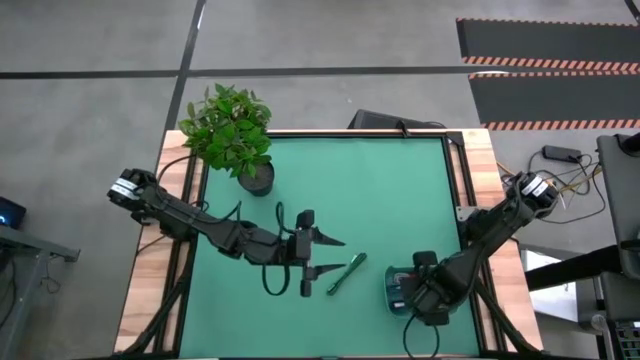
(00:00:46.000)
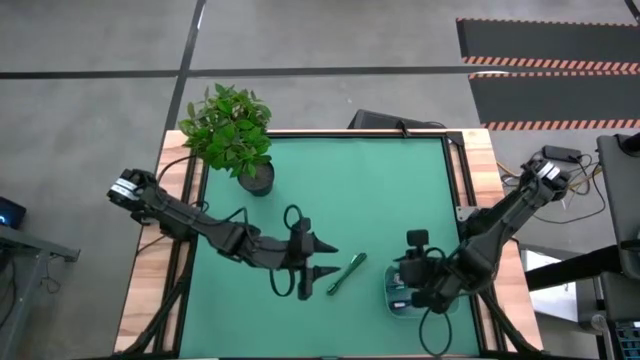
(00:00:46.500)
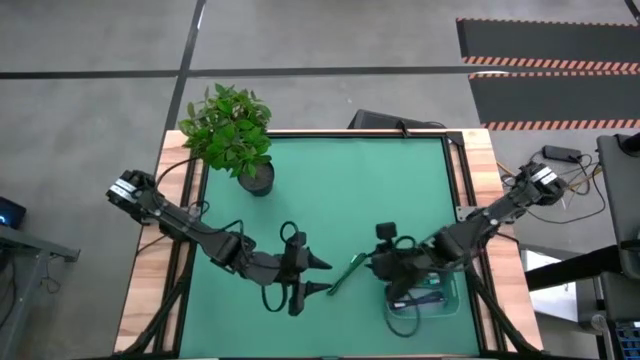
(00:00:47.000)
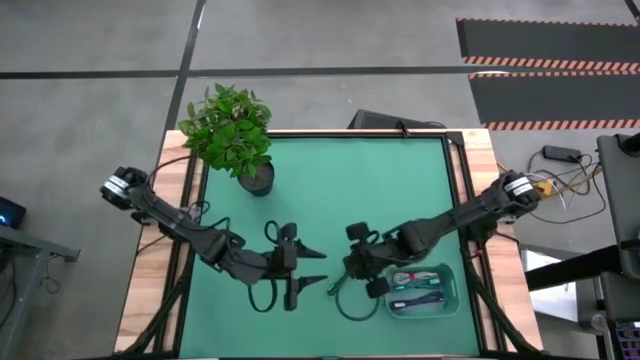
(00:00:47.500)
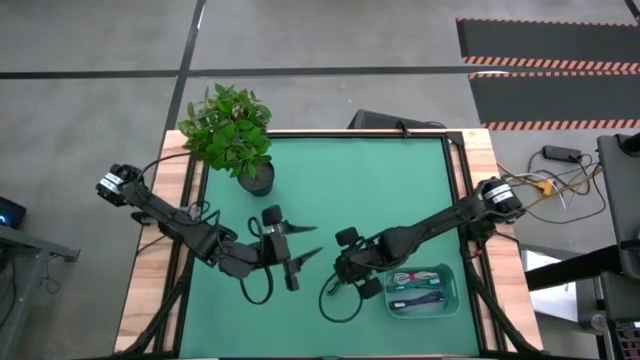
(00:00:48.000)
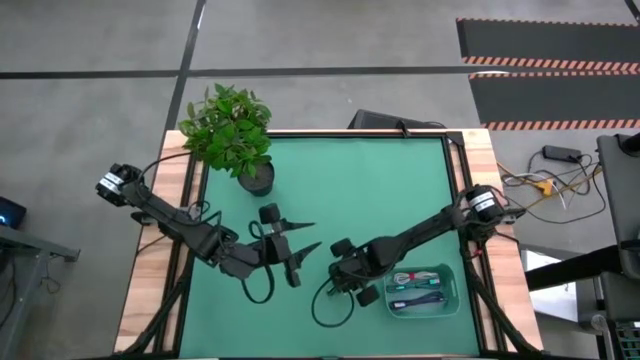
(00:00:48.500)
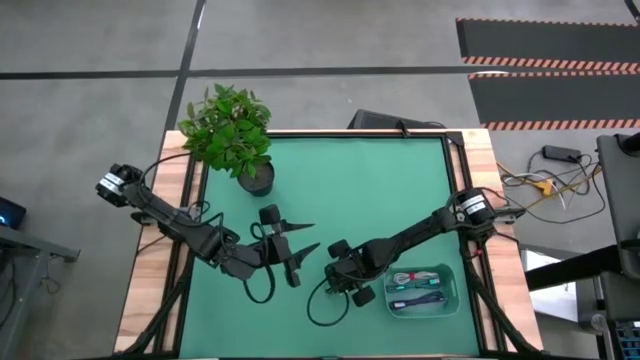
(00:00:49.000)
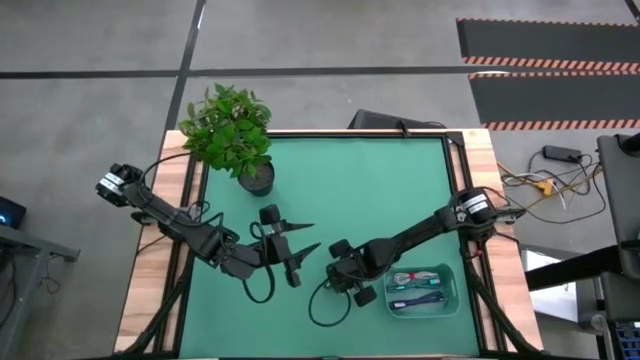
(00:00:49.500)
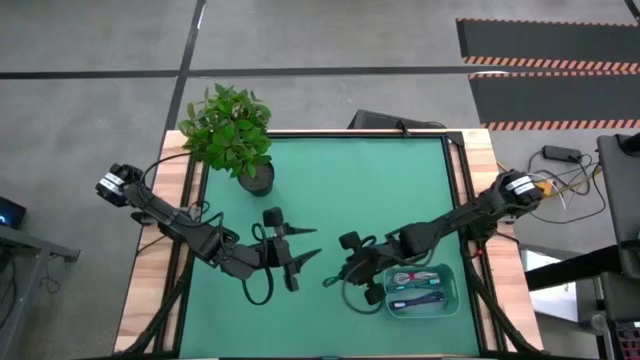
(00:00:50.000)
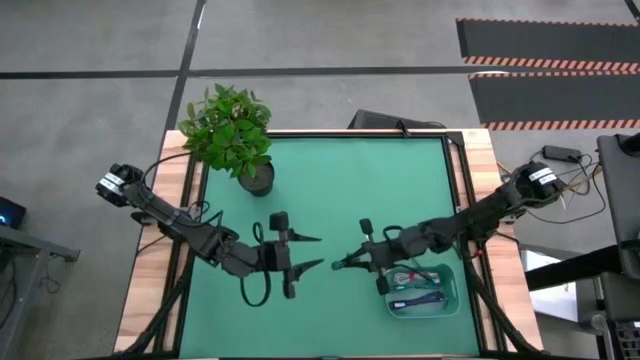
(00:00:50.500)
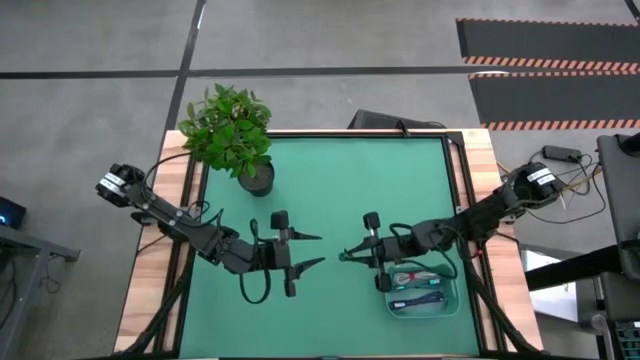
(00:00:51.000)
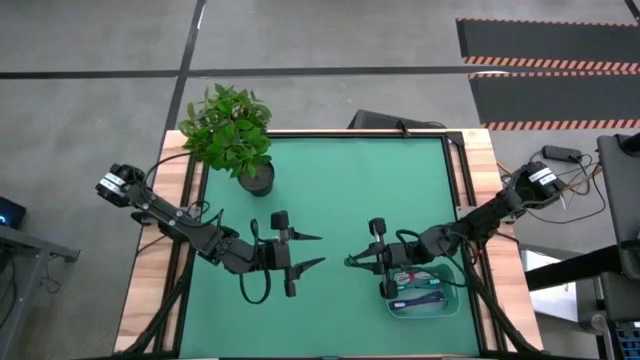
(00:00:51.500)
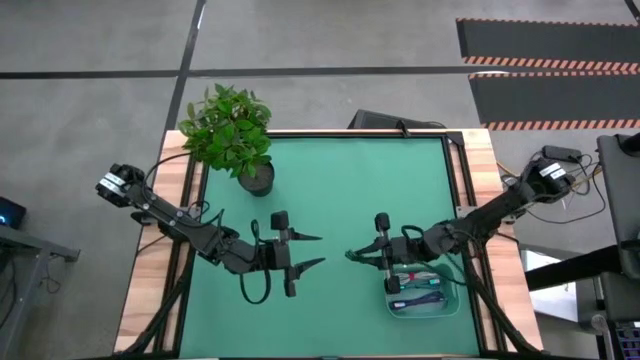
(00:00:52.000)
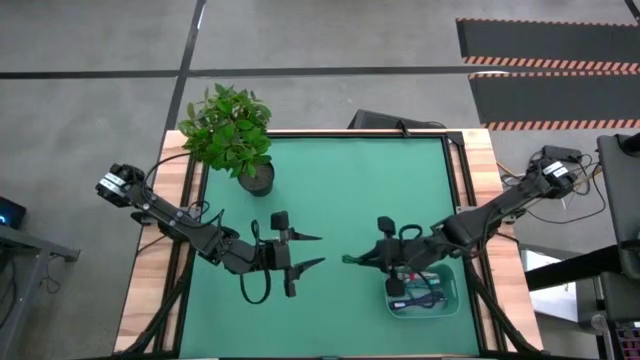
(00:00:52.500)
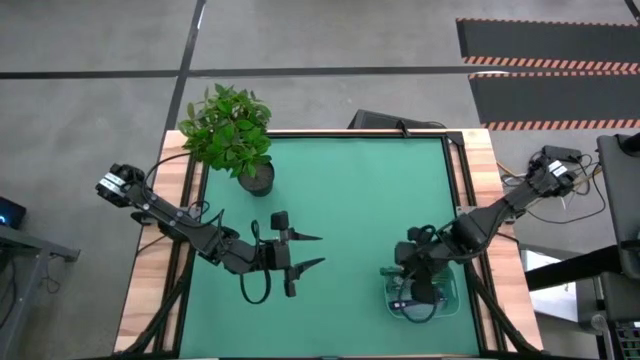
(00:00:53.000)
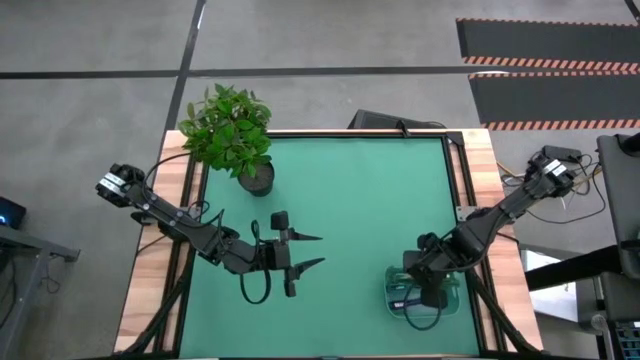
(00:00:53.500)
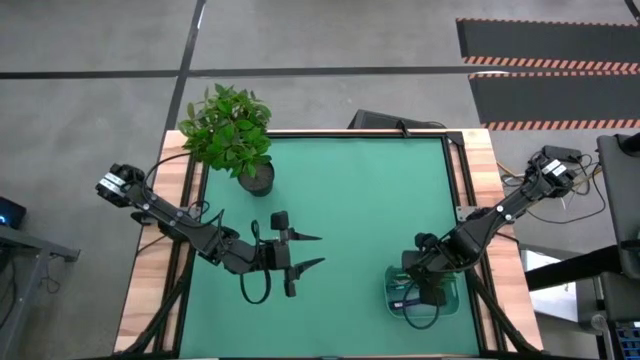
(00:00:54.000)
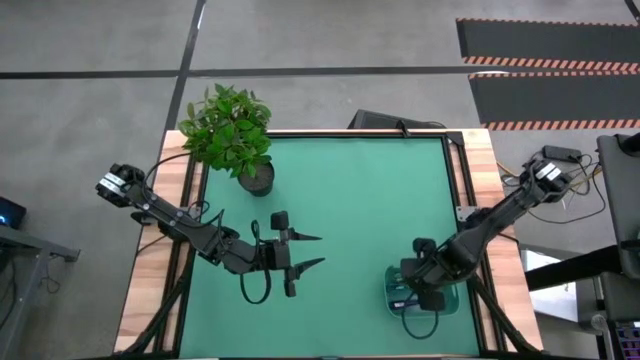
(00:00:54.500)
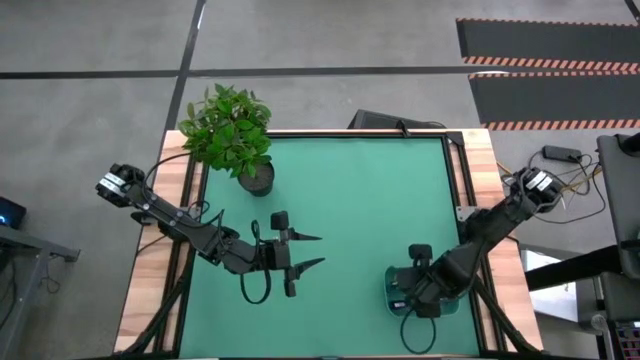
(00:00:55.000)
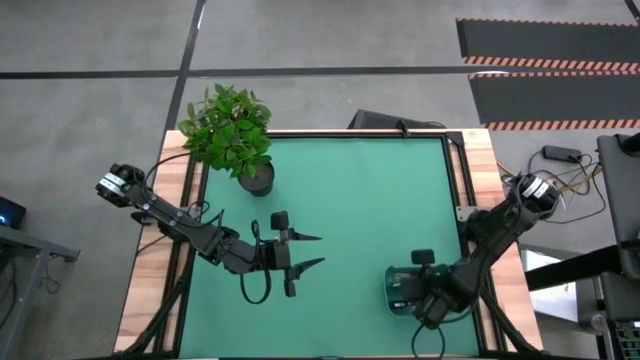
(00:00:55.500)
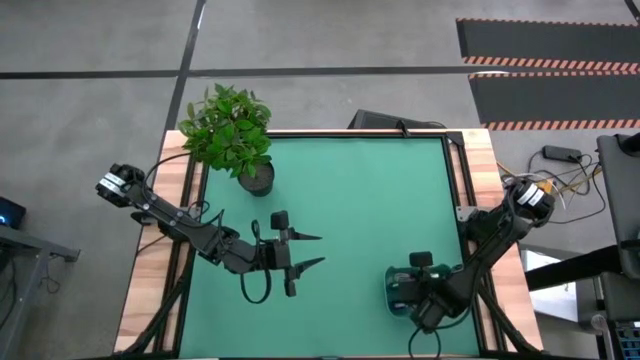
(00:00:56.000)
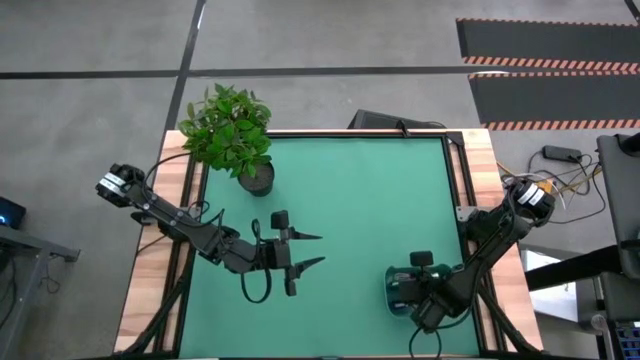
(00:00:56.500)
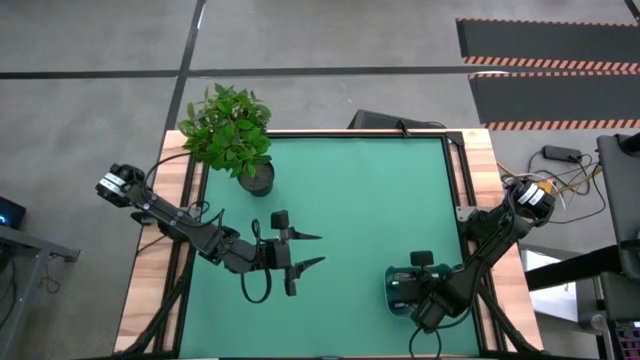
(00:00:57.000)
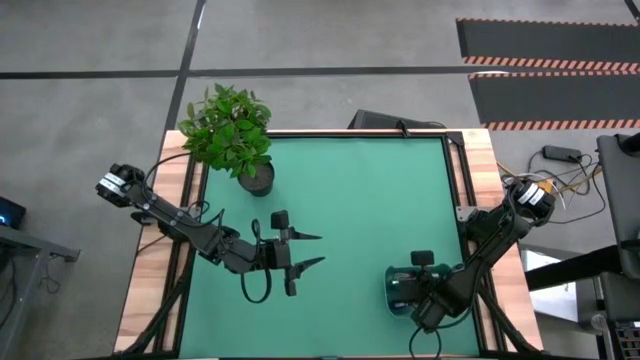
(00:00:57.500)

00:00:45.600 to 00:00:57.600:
Task: Pick and place USB-C Cables
Put the black green charger cable into the green bin

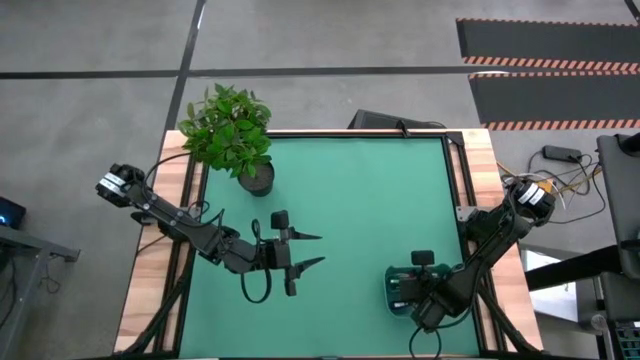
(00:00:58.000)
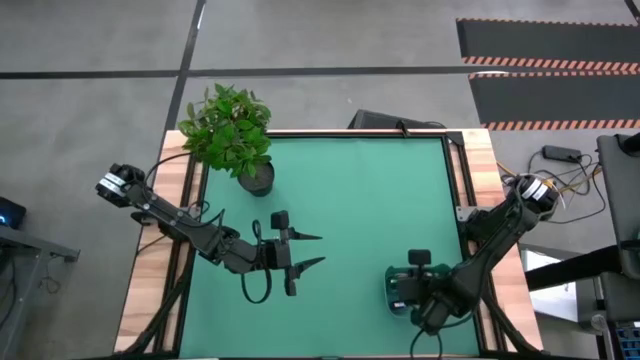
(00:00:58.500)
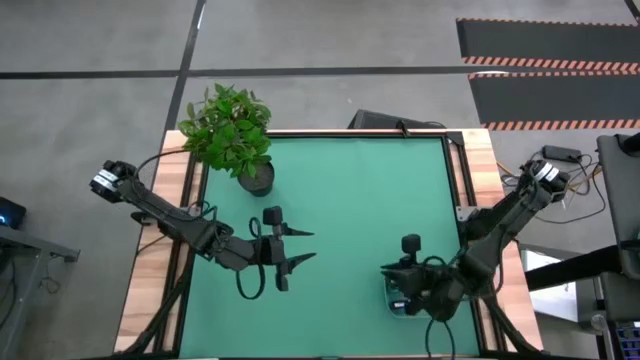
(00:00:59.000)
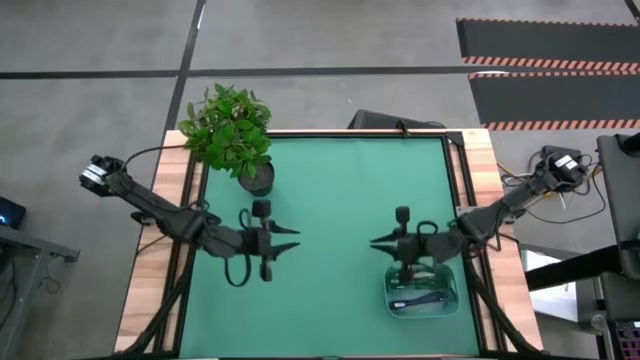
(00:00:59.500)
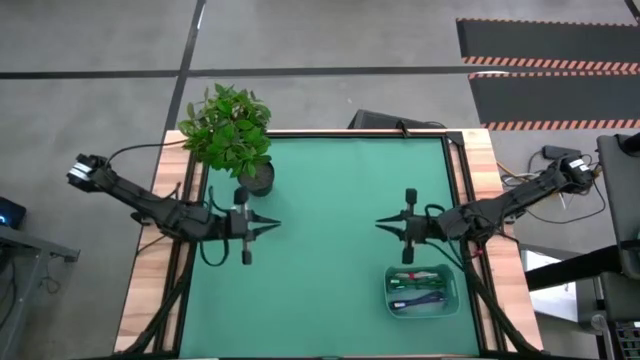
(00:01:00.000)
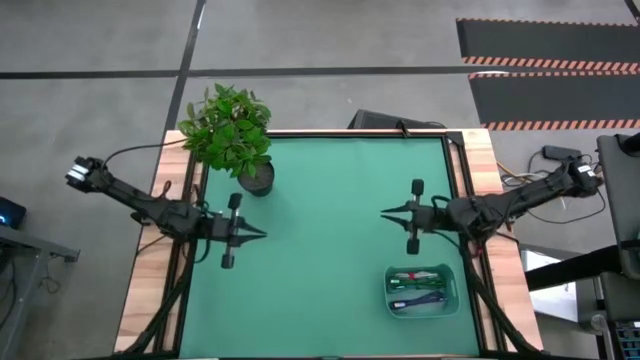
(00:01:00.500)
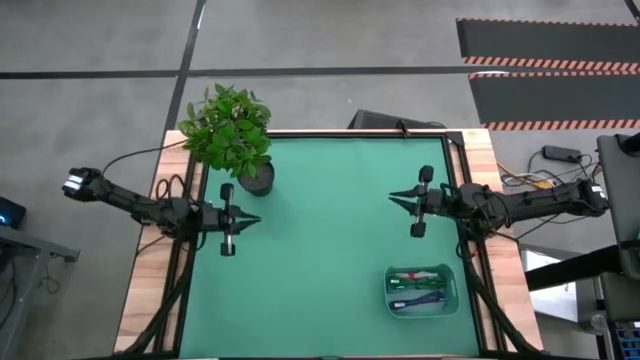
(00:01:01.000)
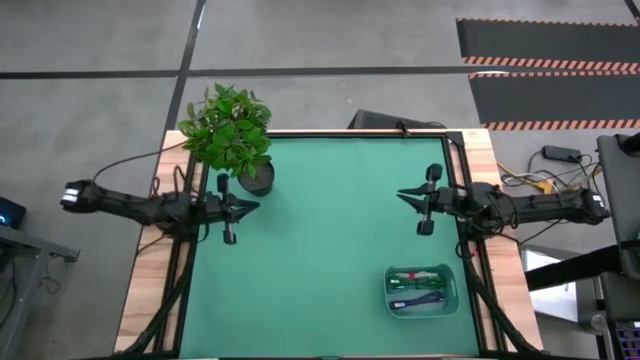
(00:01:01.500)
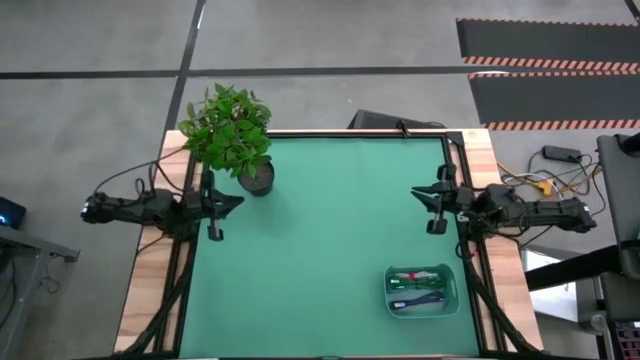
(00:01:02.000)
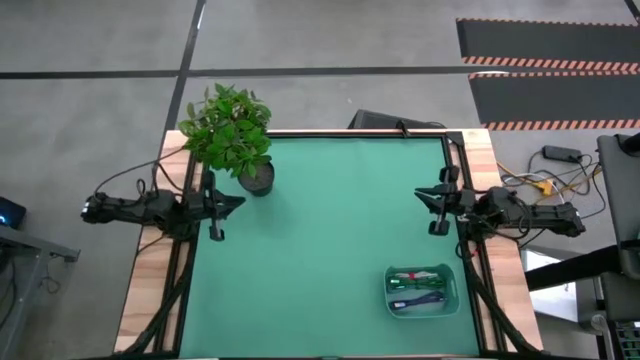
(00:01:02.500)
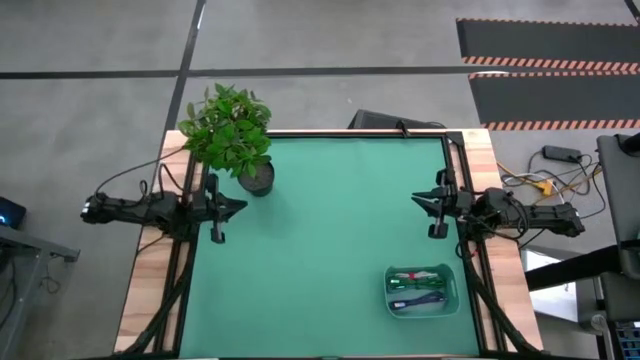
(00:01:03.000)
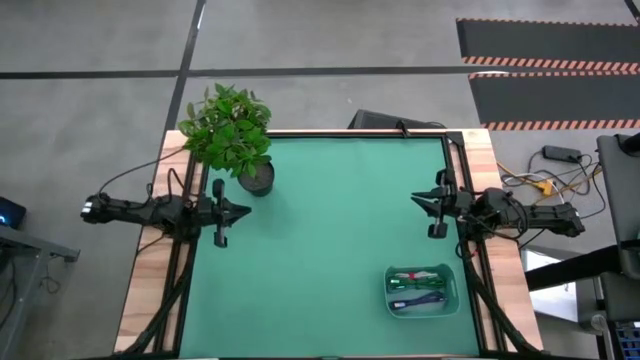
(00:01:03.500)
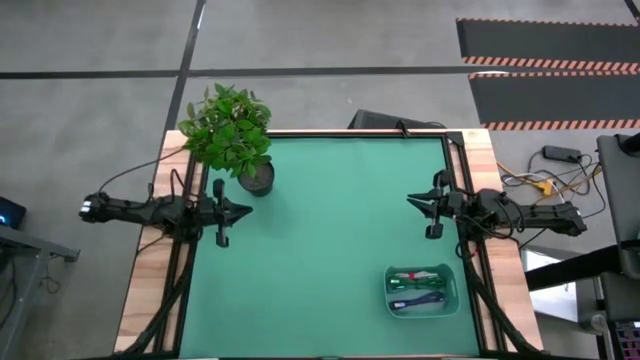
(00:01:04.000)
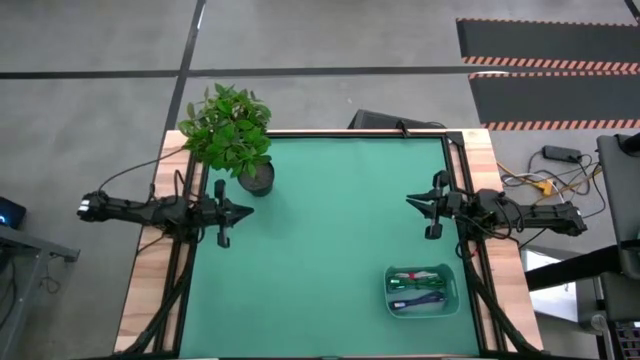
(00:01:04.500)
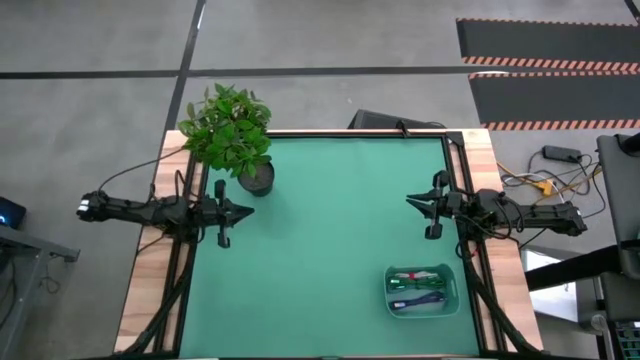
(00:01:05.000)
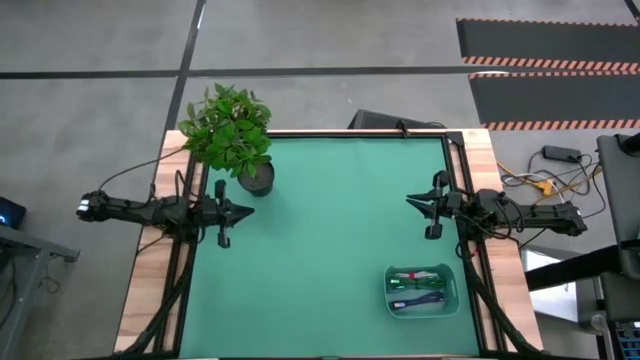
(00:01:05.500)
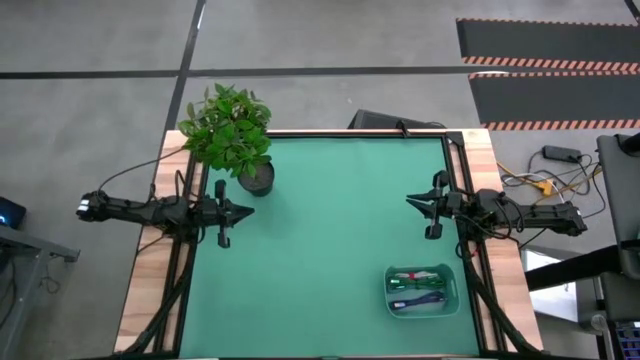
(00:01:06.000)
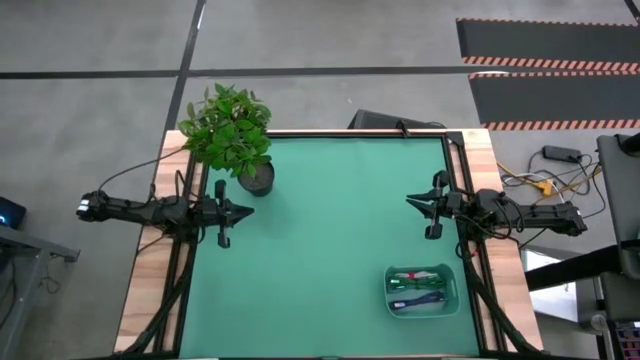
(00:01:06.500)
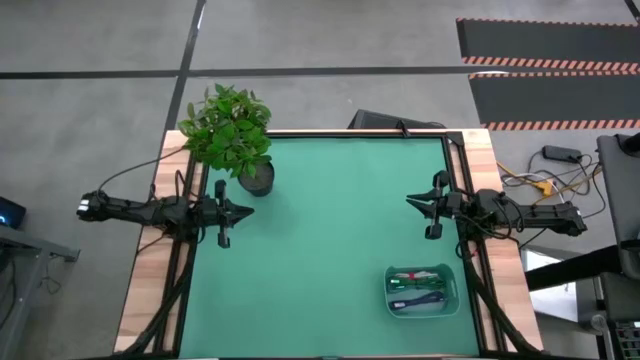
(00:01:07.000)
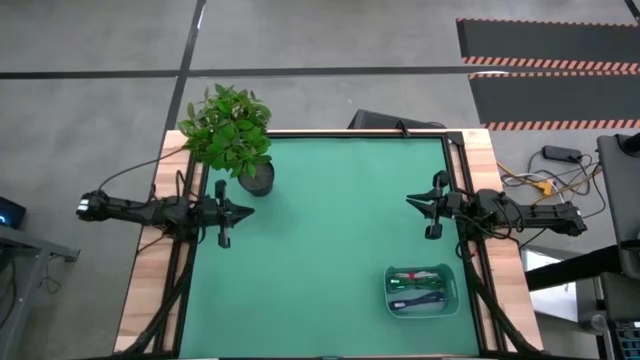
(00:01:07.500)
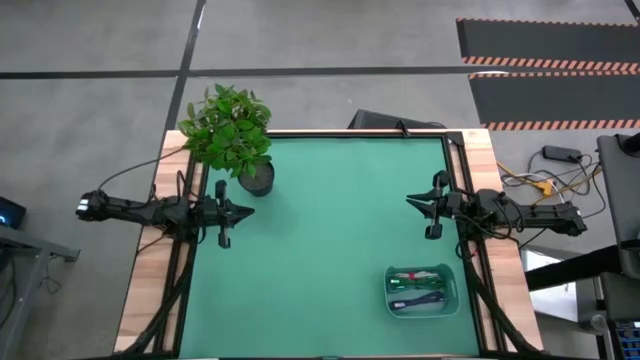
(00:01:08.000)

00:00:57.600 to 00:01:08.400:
Return to Home Position
